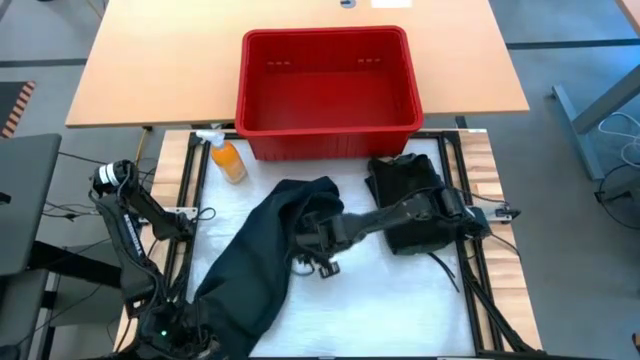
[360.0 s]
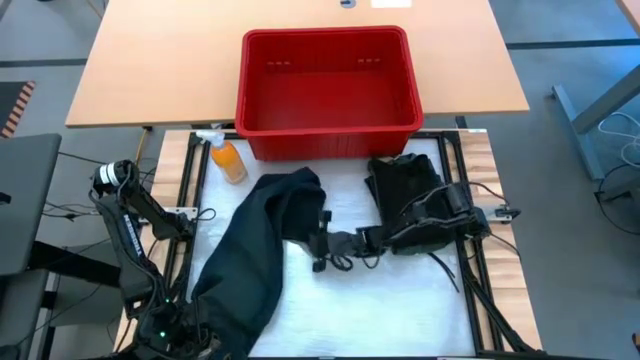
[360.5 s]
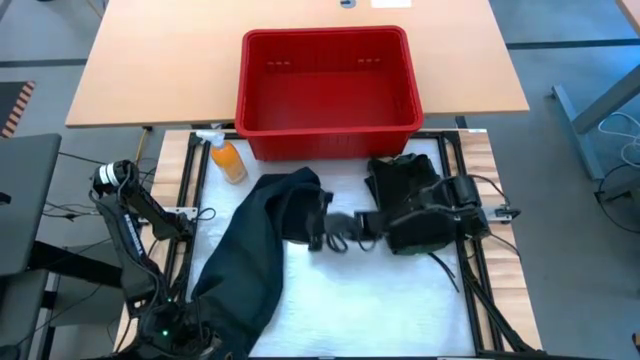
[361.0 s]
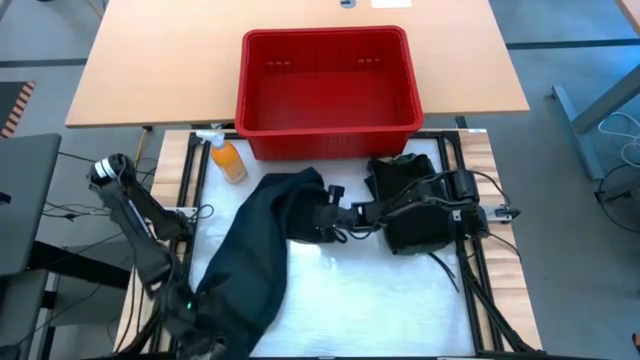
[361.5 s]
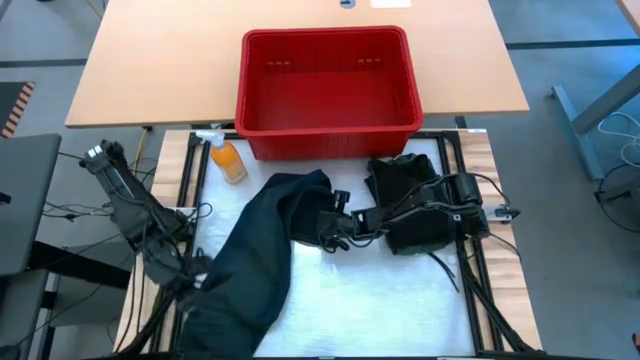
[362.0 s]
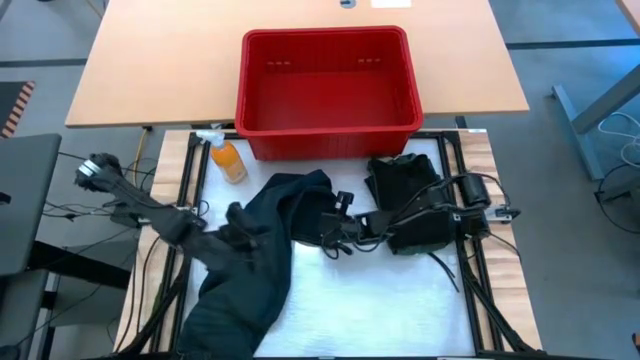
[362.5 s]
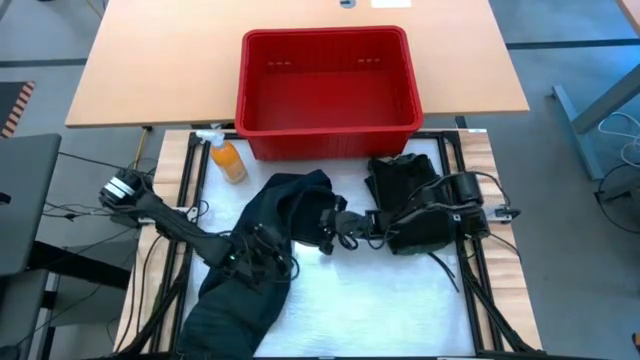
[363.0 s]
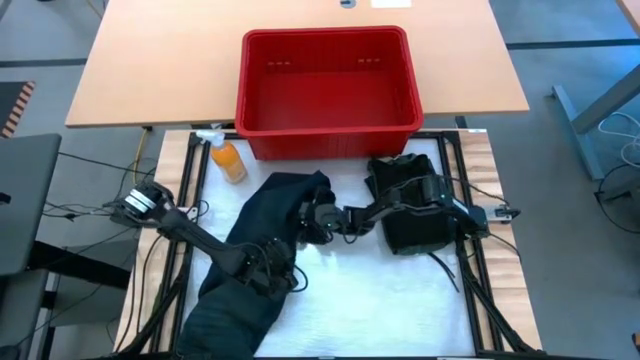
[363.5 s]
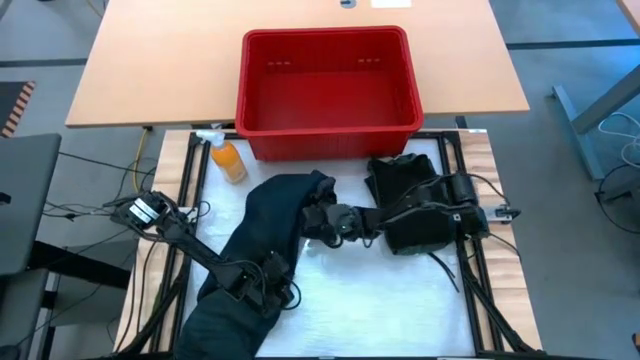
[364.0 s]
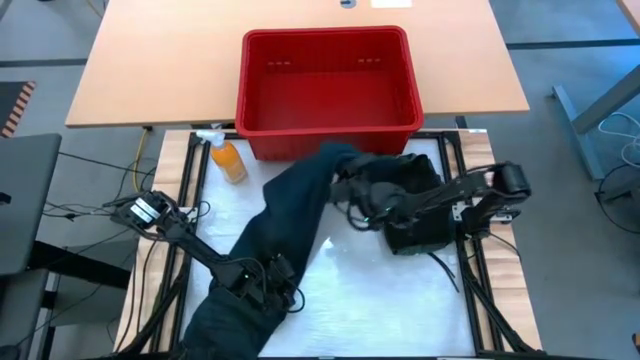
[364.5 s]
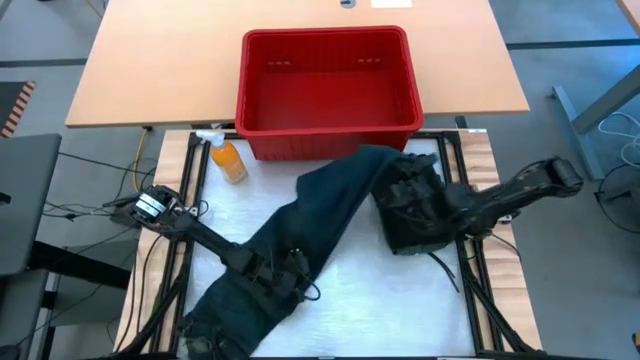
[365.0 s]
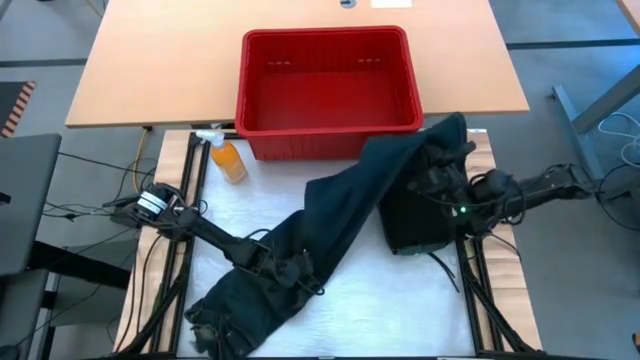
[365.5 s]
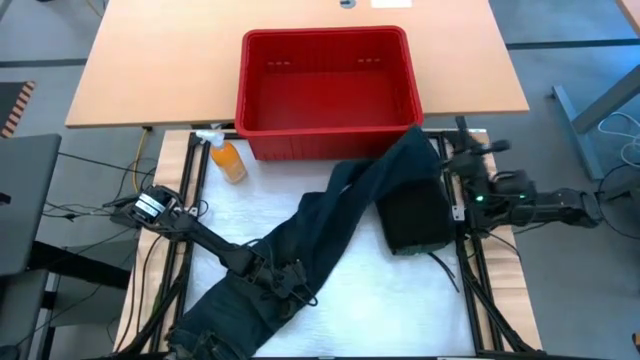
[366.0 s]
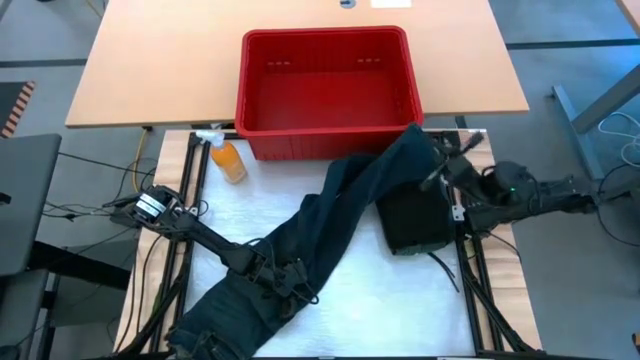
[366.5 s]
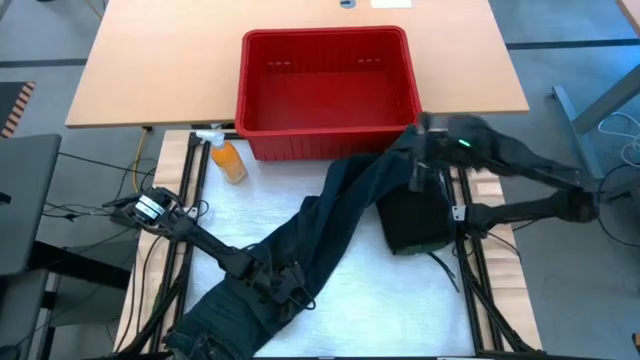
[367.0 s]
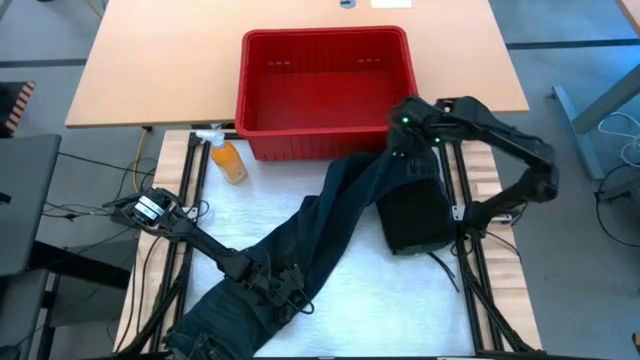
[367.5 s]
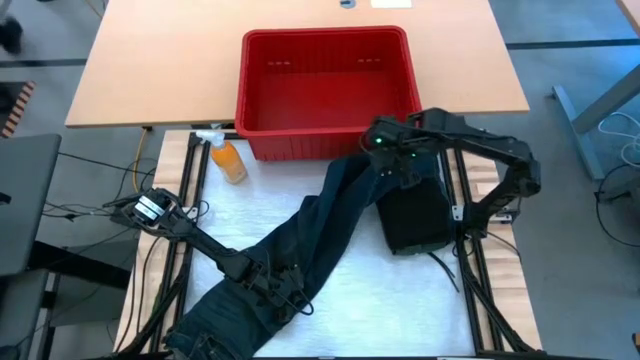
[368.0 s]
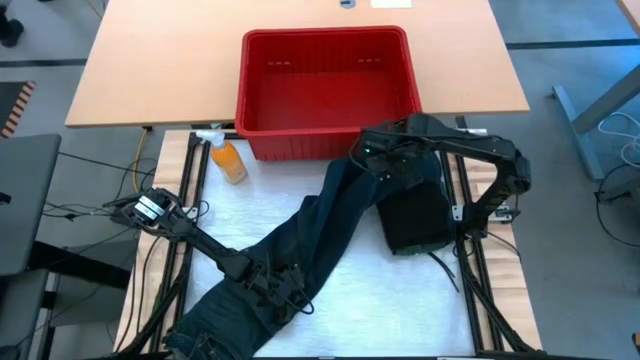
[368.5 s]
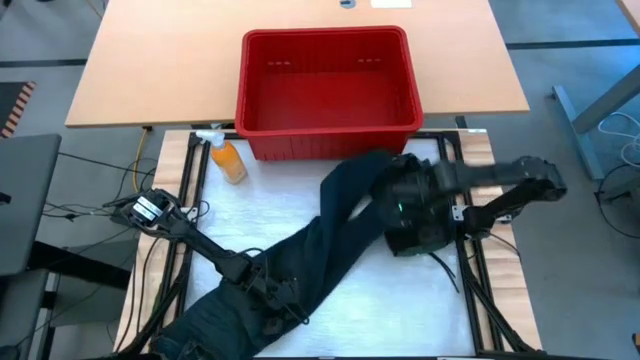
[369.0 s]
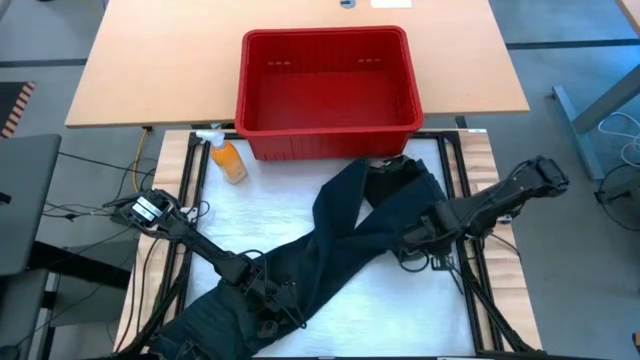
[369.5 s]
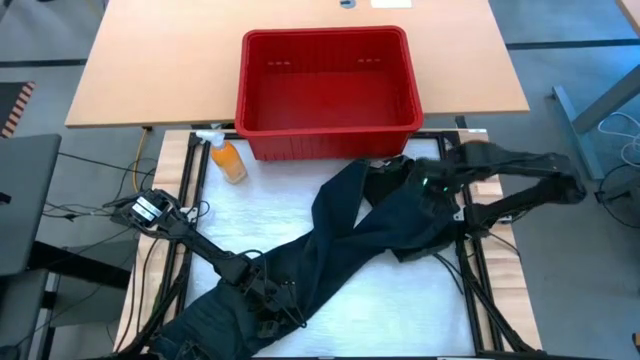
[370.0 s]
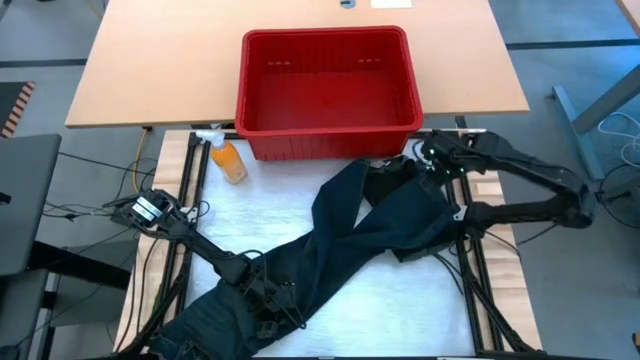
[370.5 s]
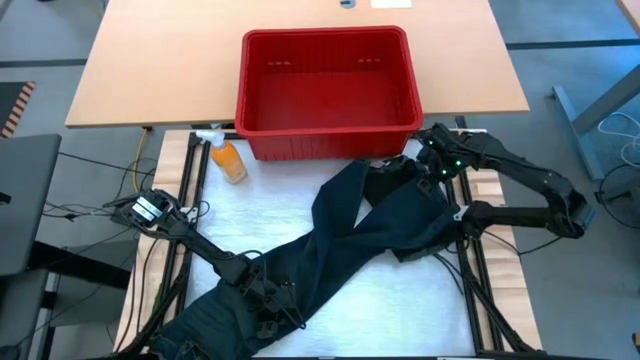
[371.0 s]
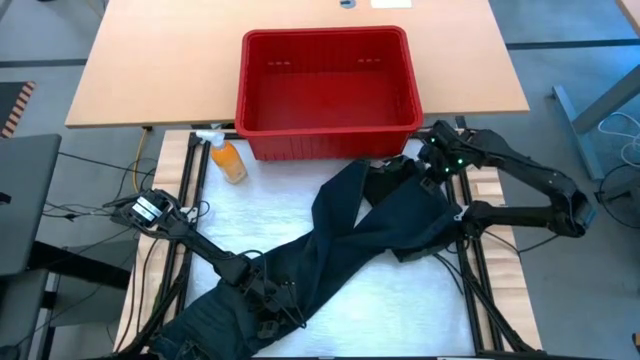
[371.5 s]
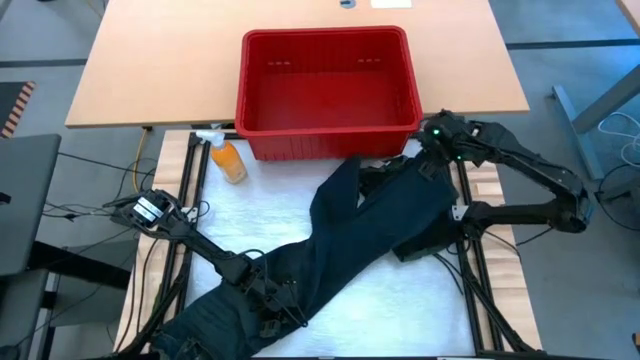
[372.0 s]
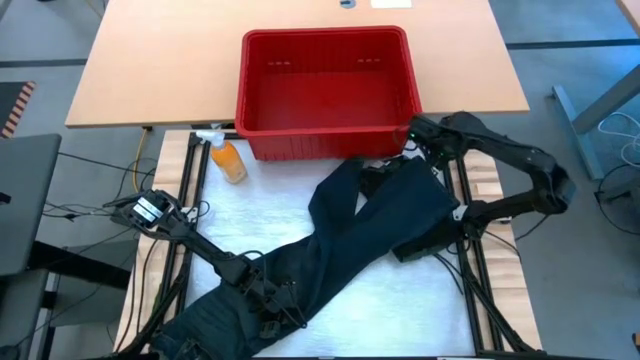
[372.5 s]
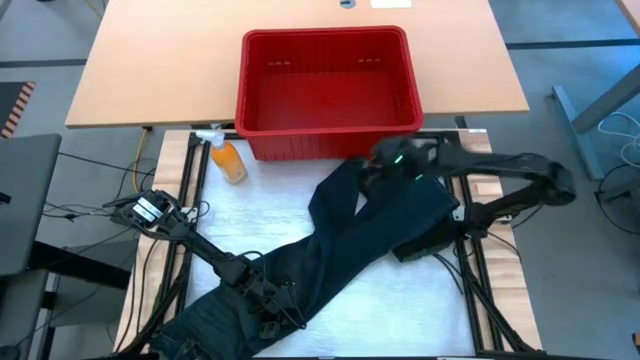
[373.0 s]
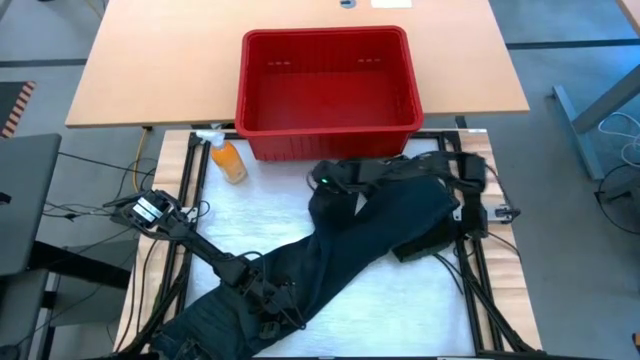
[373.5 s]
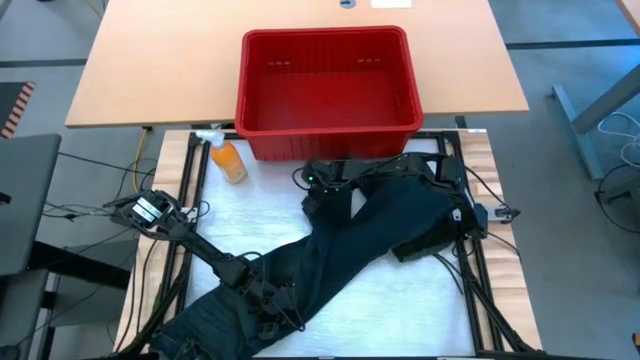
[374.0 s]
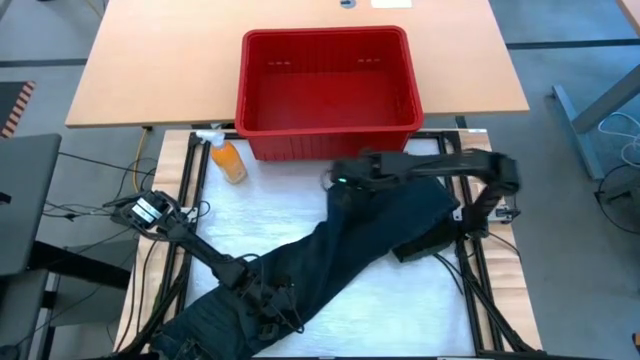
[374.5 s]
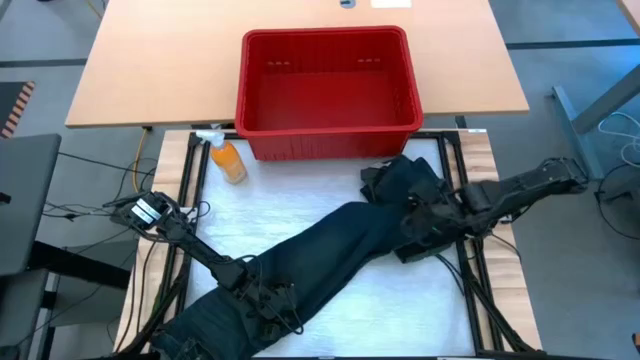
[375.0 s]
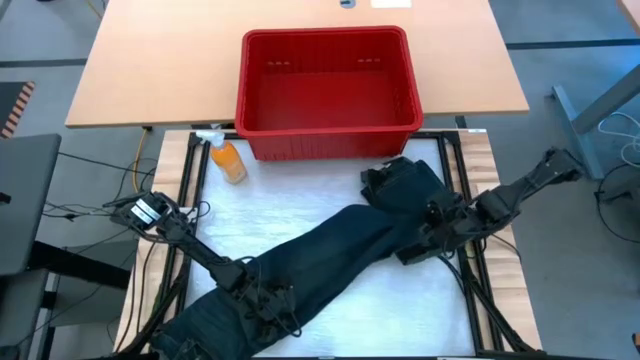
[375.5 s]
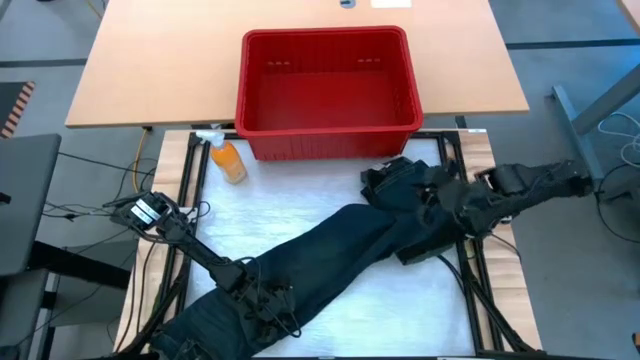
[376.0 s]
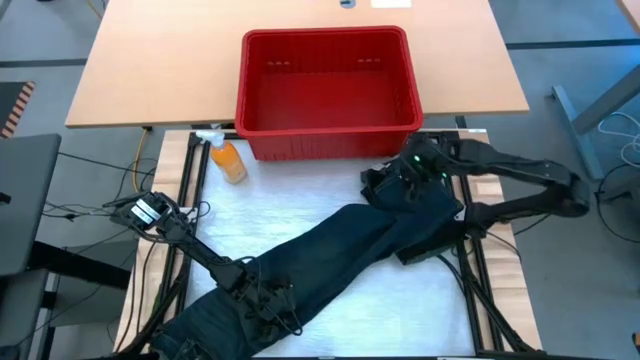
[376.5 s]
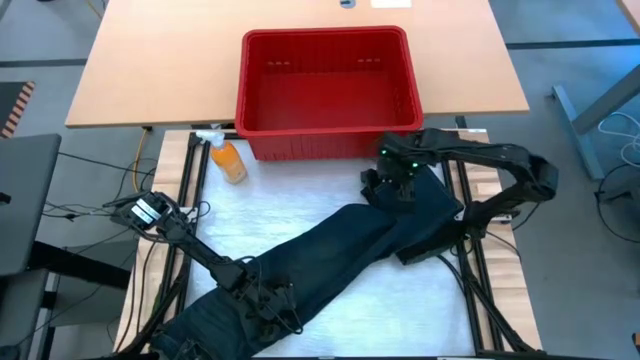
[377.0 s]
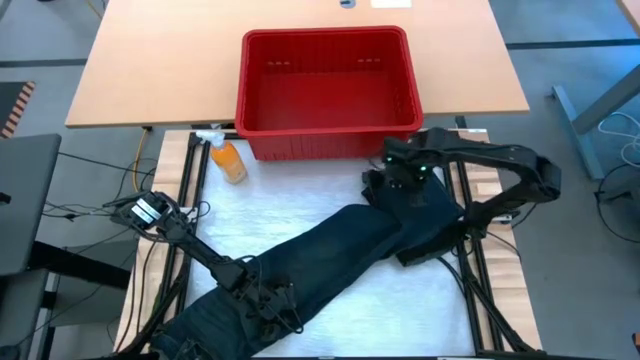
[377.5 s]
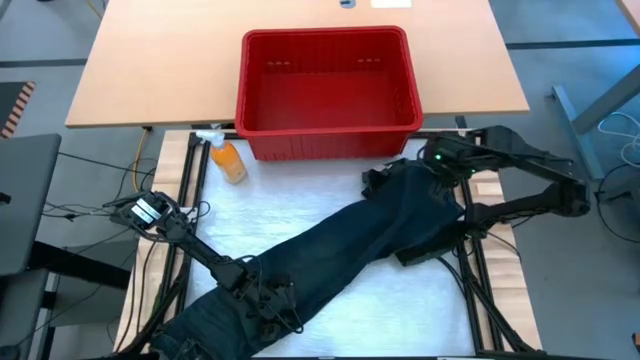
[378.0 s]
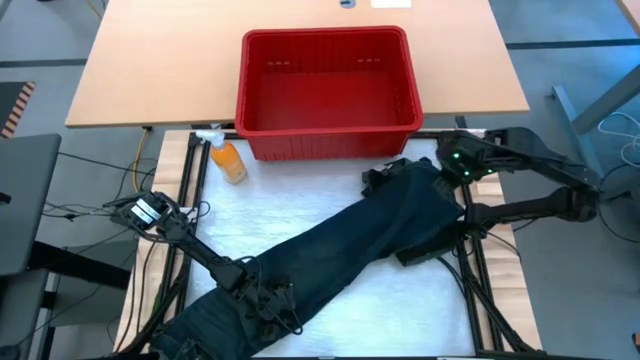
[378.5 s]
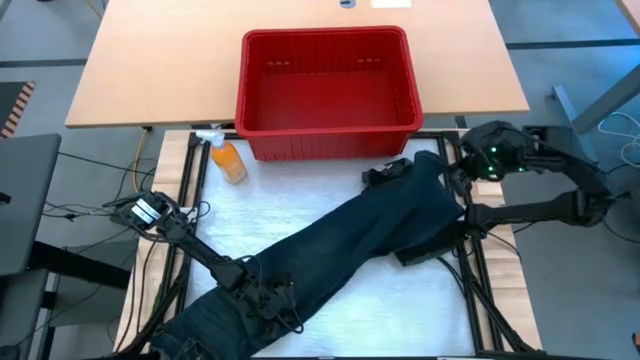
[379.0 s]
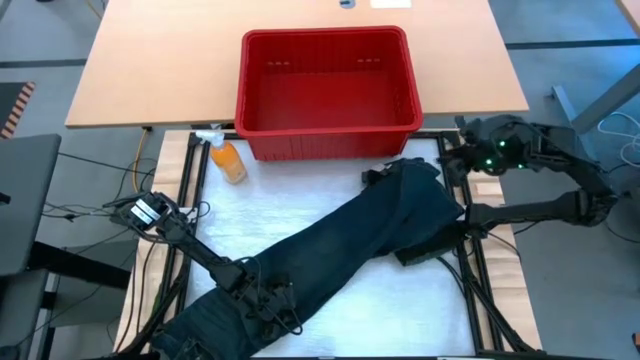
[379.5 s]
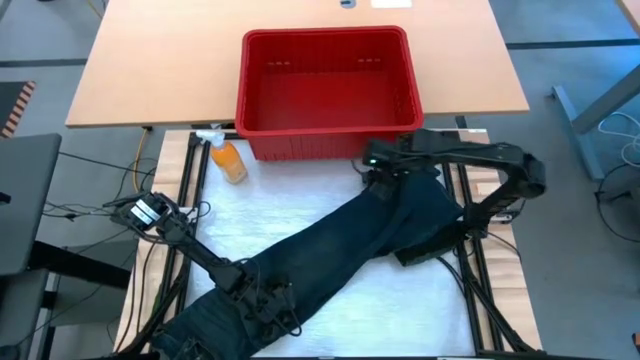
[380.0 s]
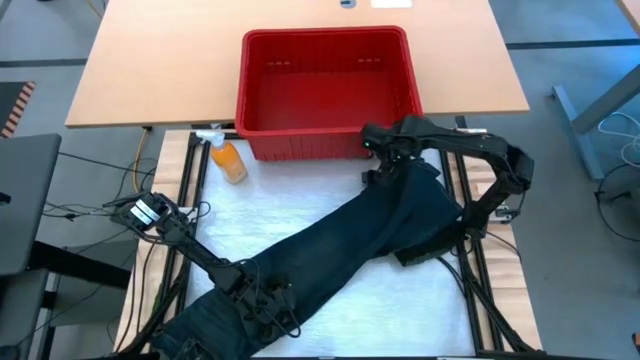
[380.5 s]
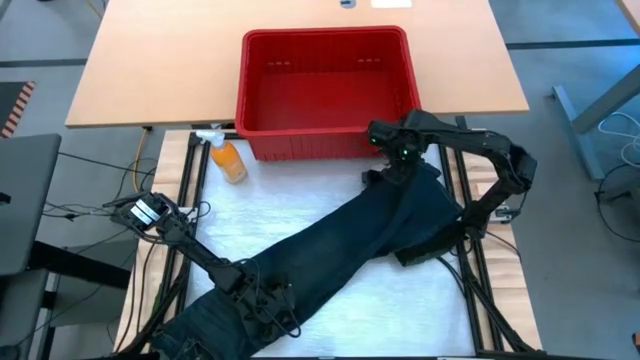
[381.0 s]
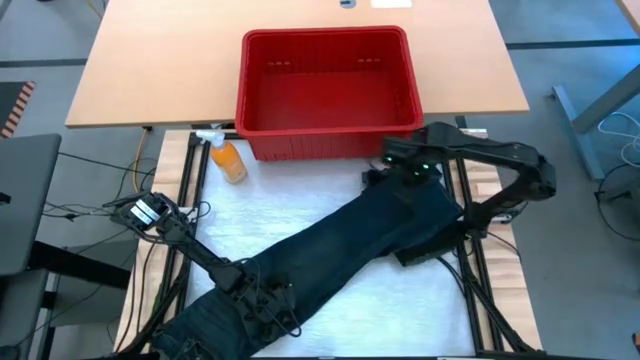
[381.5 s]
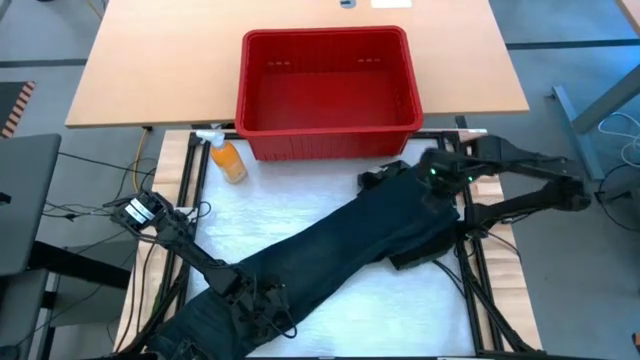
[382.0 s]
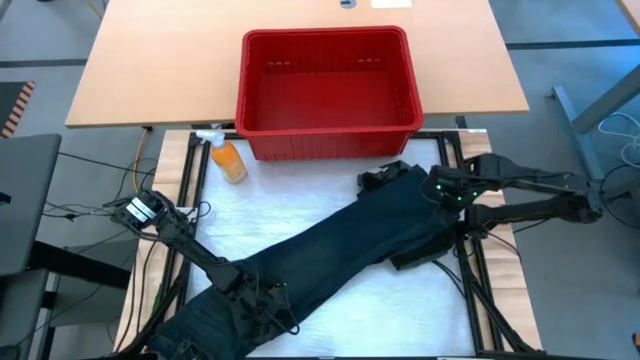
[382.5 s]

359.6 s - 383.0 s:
Task: Fold laundry
Fold the dark blue jeans
